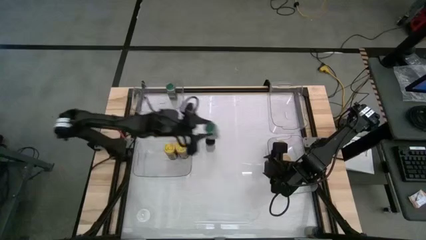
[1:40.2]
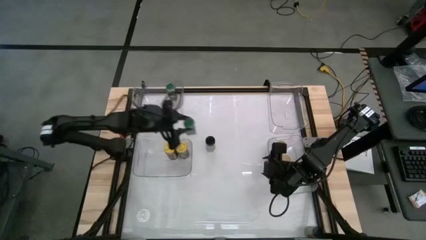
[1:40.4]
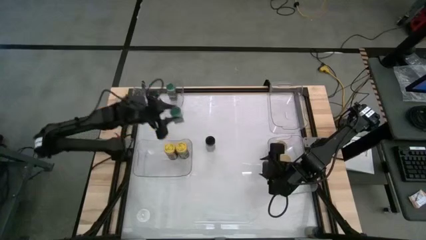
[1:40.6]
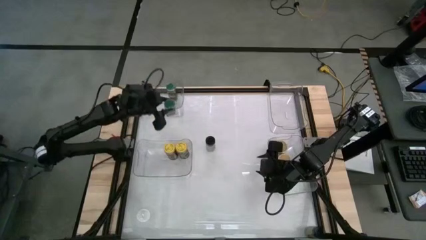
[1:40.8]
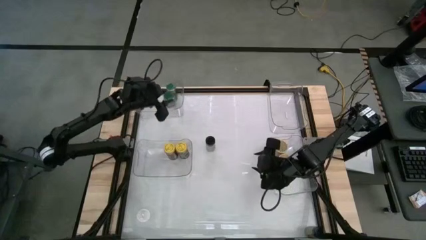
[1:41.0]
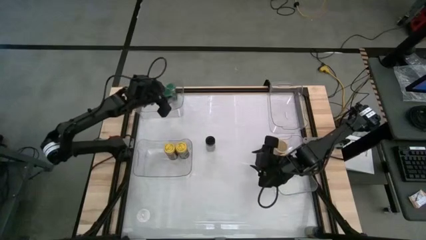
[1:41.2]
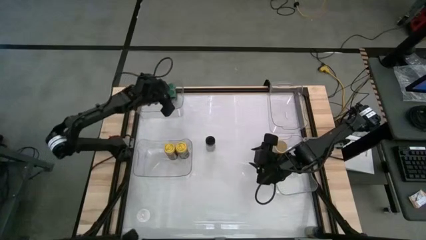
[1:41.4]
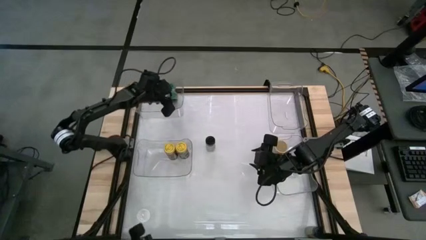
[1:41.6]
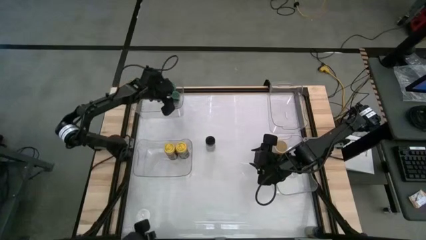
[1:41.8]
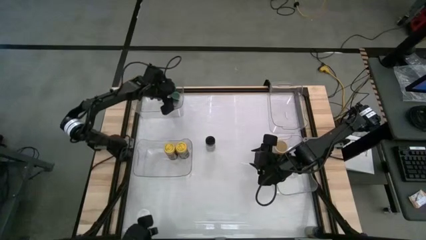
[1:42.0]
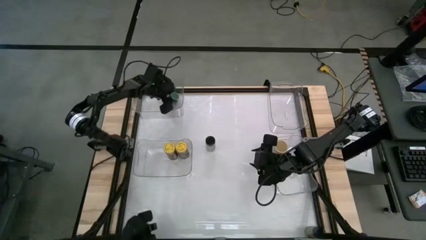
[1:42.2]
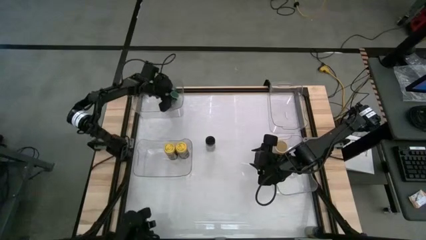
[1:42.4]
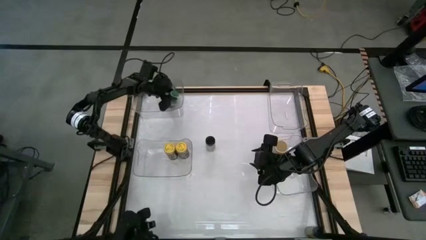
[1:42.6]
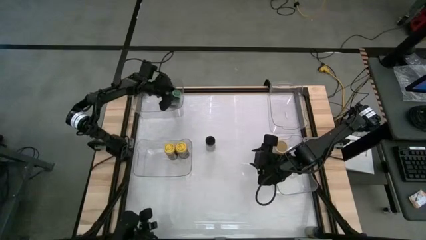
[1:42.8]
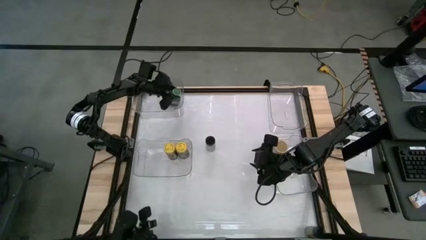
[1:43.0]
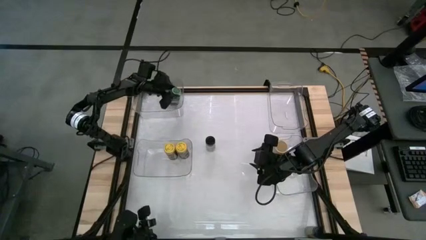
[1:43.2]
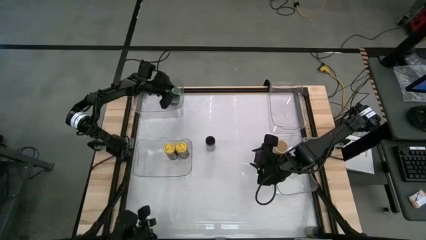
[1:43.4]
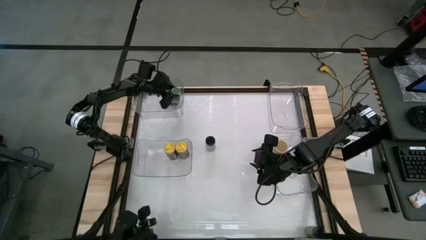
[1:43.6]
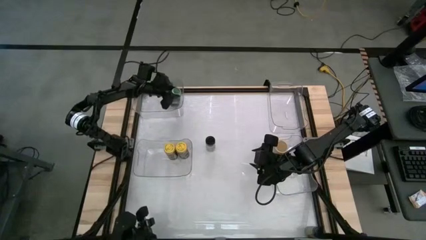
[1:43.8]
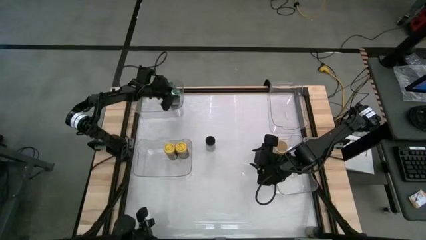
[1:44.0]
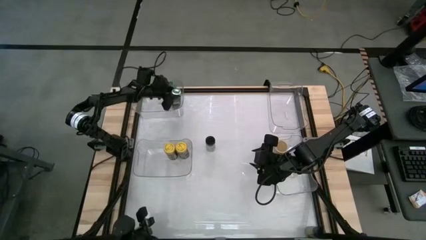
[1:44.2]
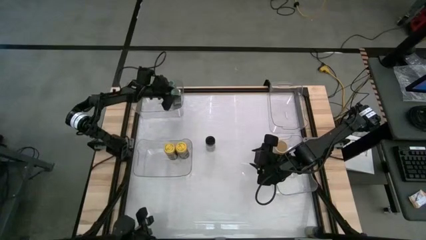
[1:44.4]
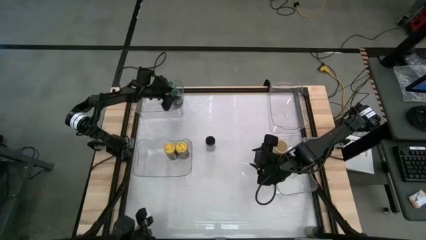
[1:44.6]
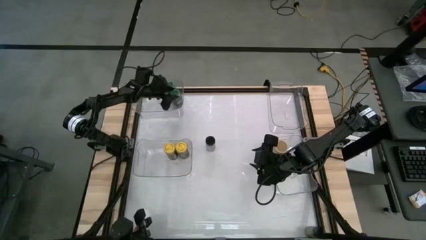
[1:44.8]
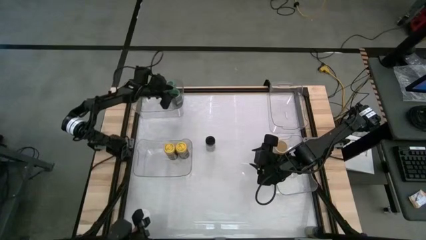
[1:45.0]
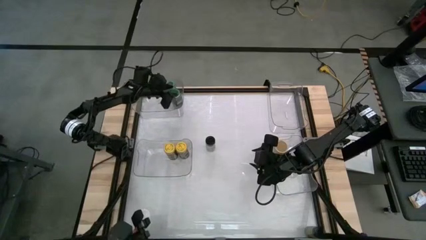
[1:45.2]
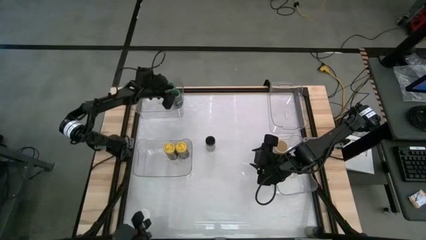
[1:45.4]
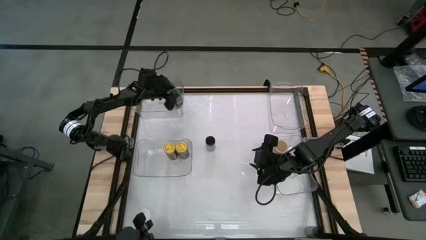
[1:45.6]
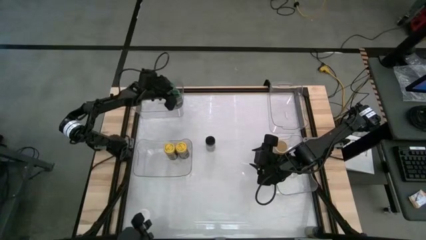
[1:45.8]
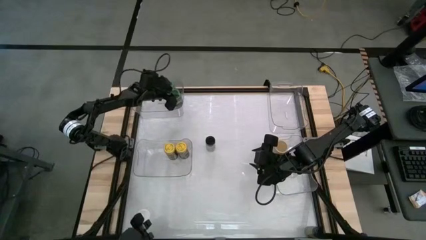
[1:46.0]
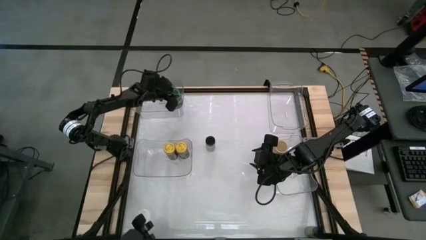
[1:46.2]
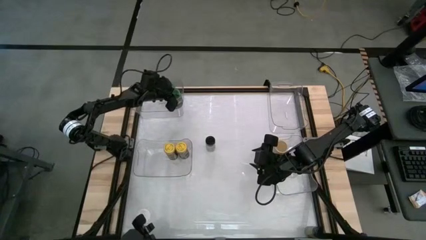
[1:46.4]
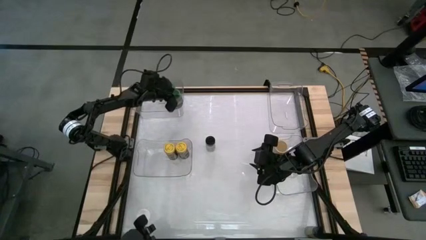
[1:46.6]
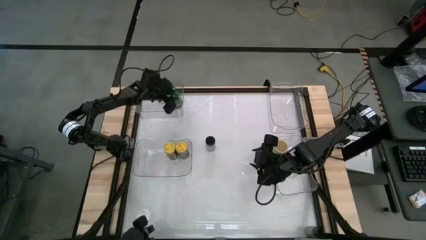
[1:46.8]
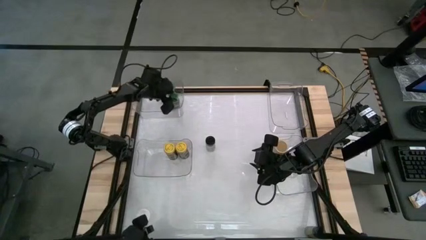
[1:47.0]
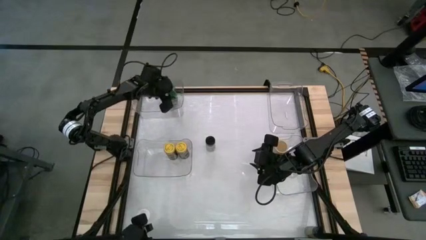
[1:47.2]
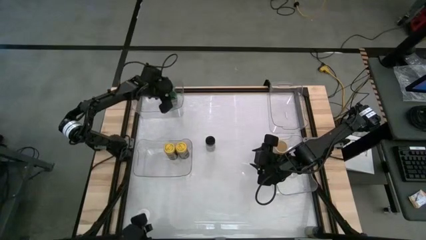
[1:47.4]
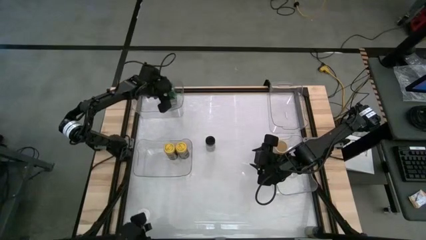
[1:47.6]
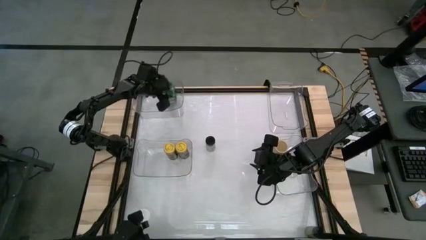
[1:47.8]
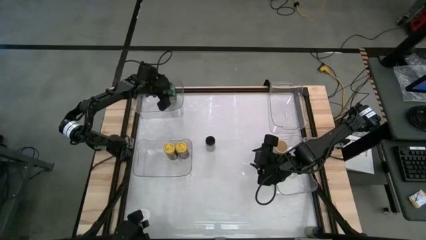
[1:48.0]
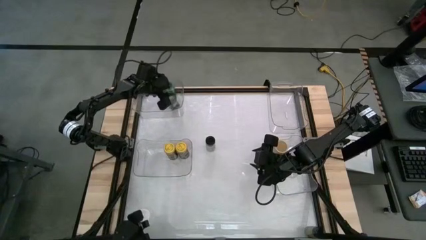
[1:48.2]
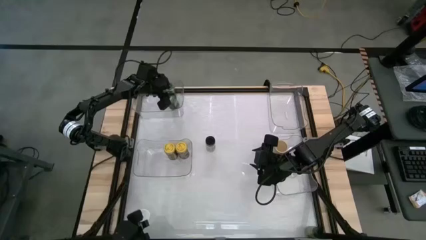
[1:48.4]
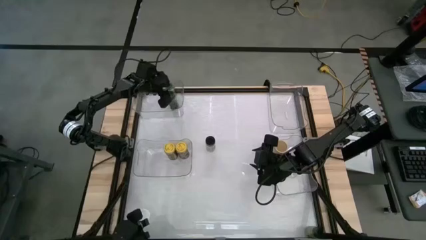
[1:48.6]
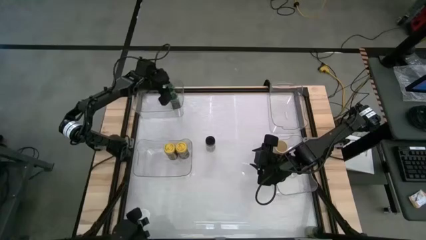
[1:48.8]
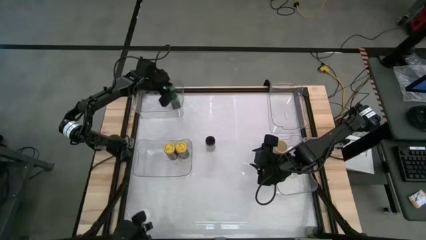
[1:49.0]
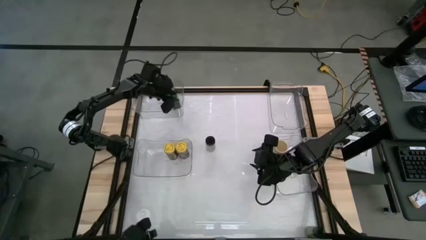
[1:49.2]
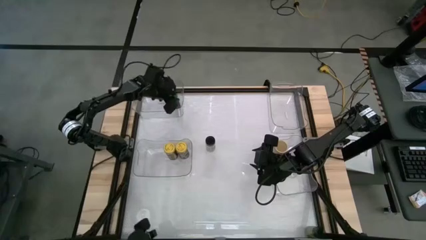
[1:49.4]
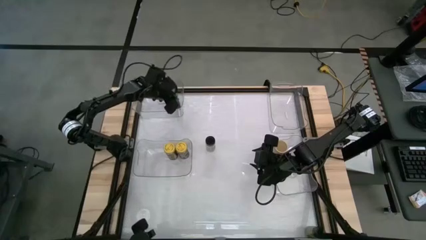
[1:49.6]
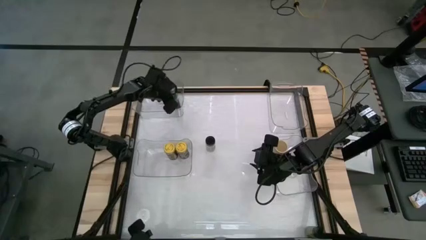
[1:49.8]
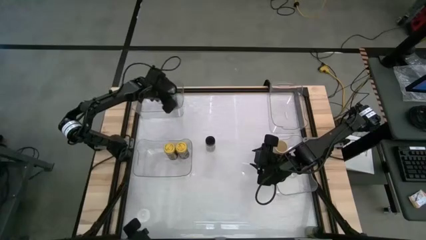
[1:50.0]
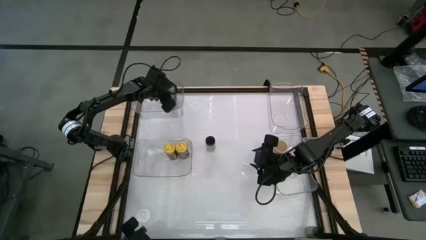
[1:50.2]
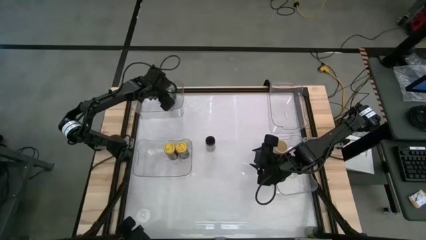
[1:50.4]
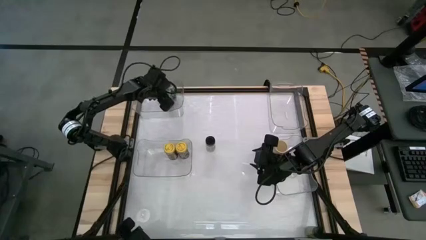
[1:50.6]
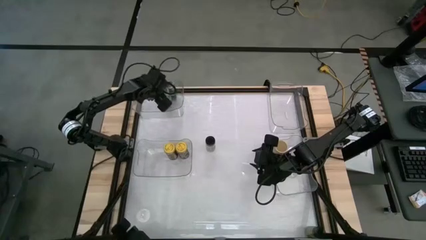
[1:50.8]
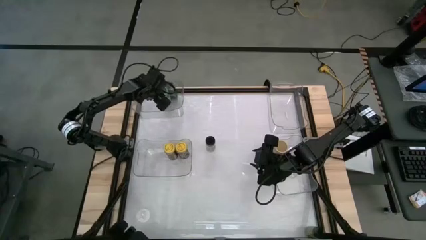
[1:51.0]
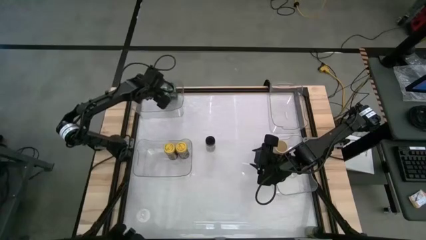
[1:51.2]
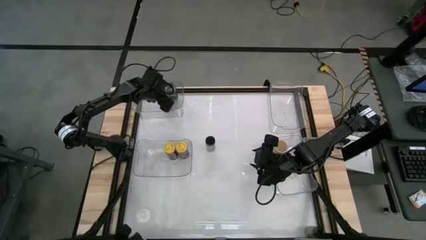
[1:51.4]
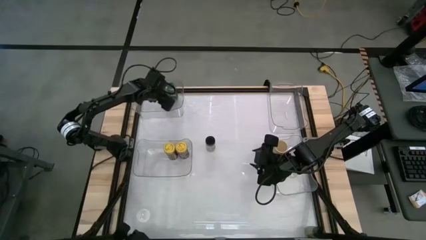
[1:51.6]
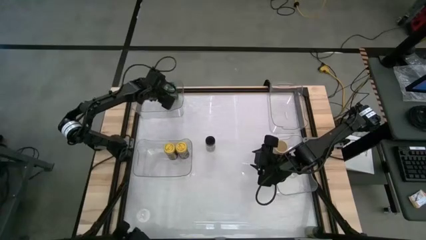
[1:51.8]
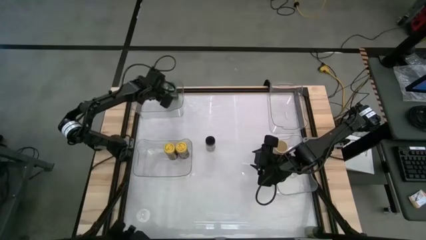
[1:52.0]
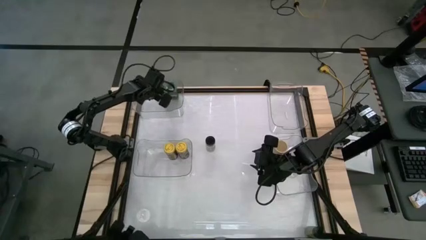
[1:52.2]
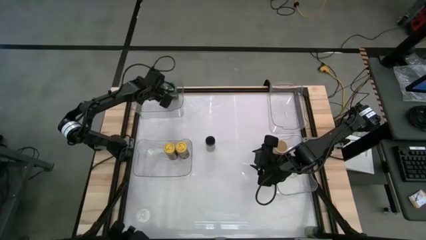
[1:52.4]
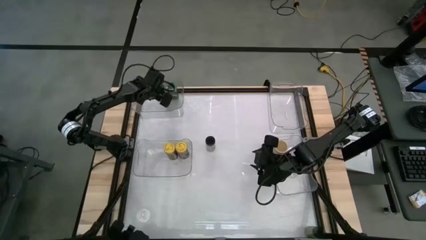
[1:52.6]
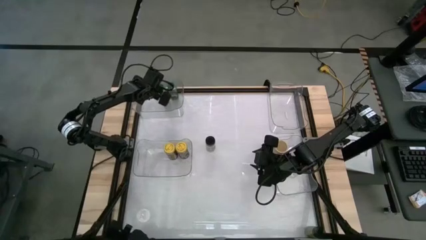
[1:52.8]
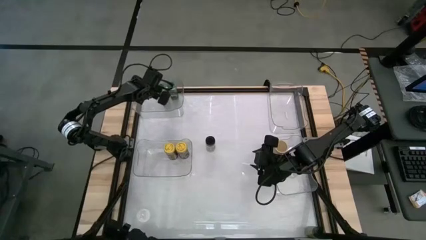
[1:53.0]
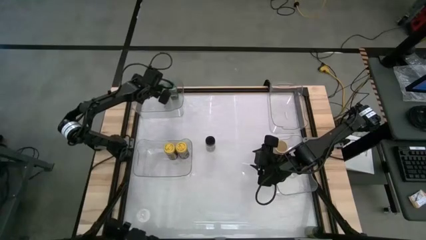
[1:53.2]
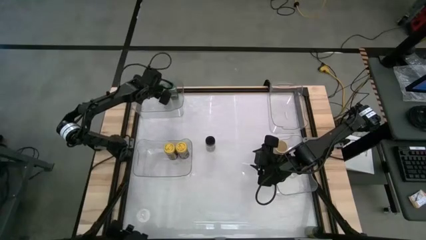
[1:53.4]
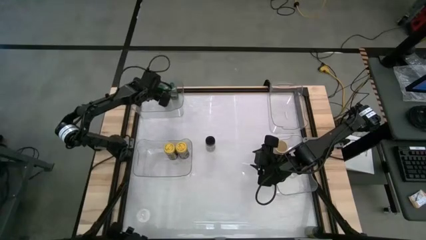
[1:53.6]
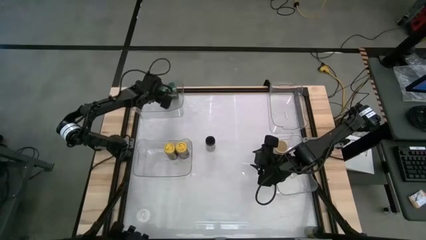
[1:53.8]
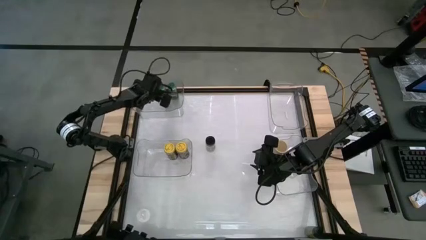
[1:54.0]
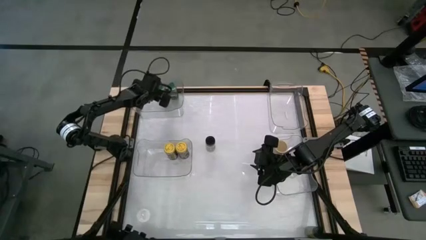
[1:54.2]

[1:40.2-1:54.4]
Task: Sort spices by type
Put the green spice bottle into the top left transparent bin

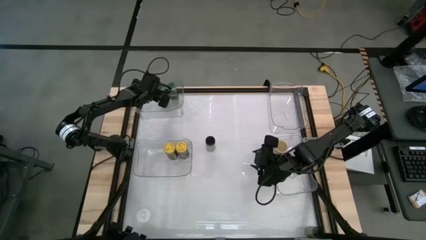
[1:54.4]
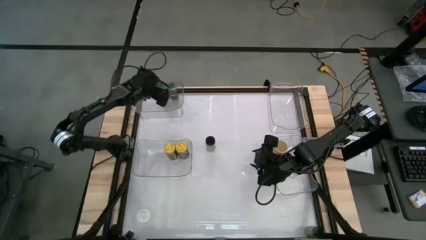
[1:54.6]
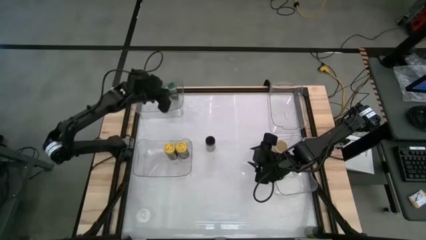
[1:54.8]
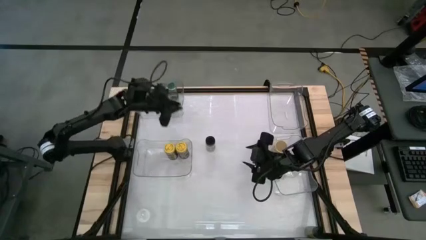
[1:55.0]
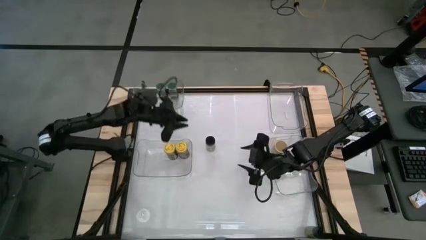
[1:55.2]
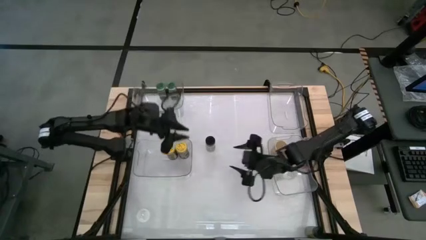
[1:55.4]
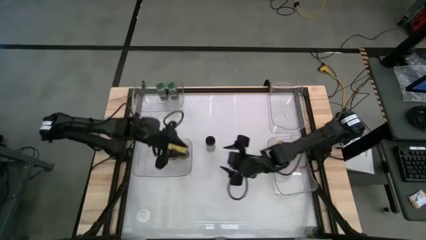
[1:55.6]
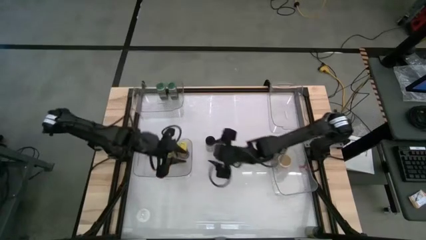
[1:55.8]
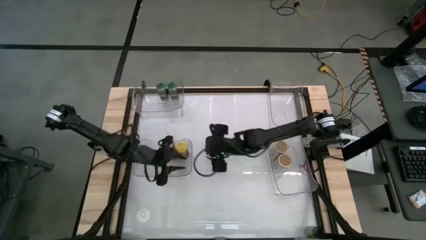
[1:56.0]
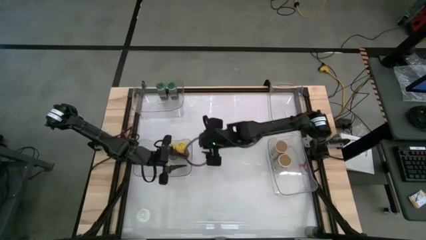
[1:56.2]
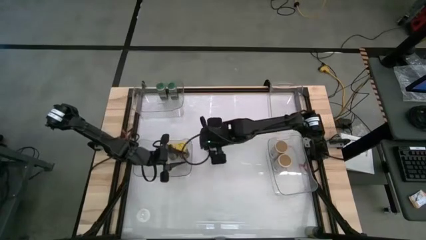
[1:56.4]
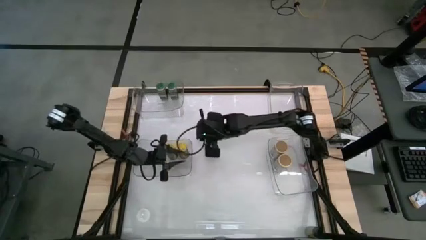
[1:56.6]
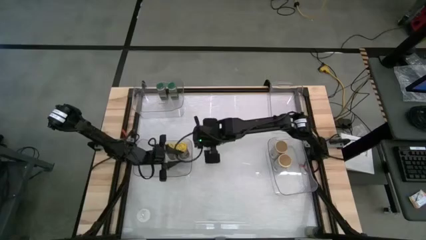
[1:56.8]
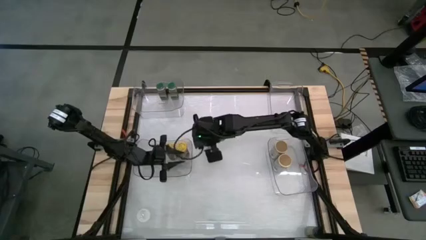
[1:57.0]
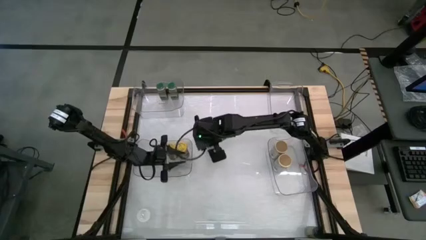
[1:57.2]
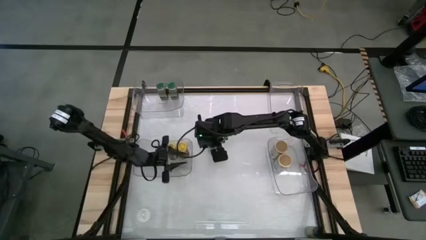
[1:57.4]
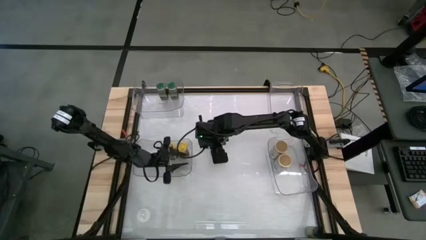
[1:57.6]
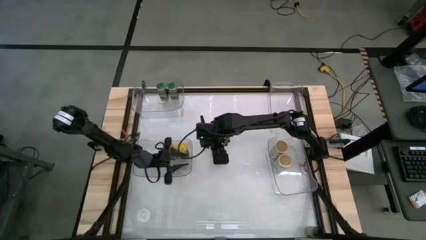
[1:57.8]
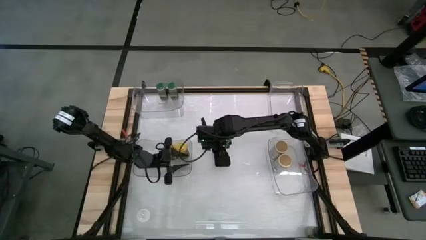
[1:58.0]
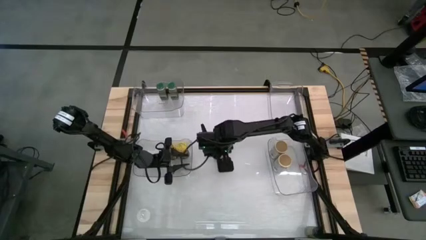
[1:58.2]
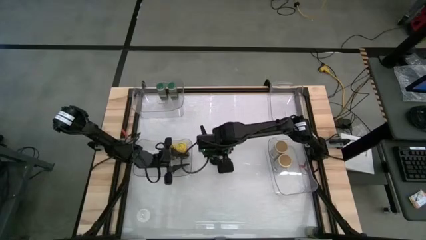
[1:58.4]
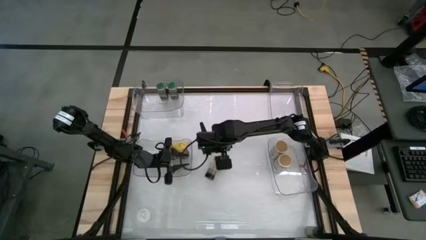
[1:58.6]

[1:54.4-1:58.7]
Put the top black spice bottle into the top right transparent bin
